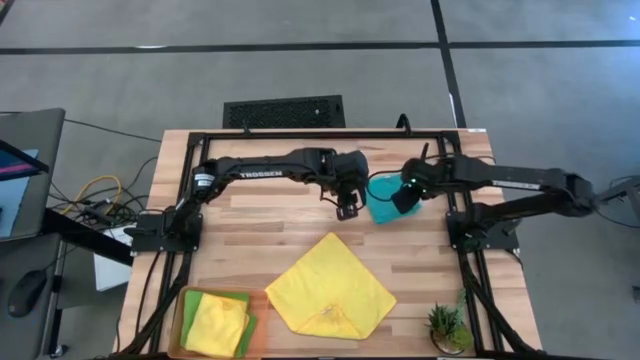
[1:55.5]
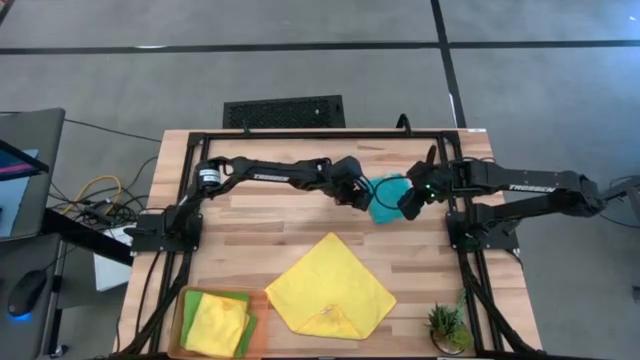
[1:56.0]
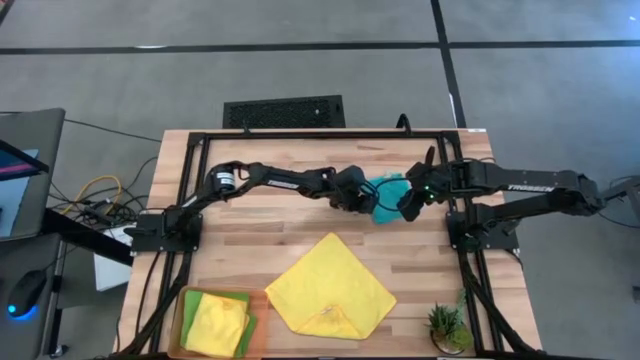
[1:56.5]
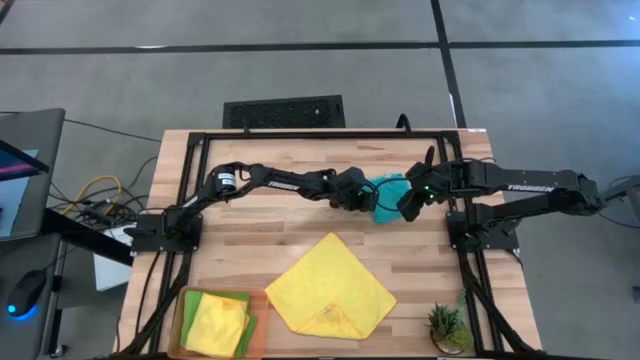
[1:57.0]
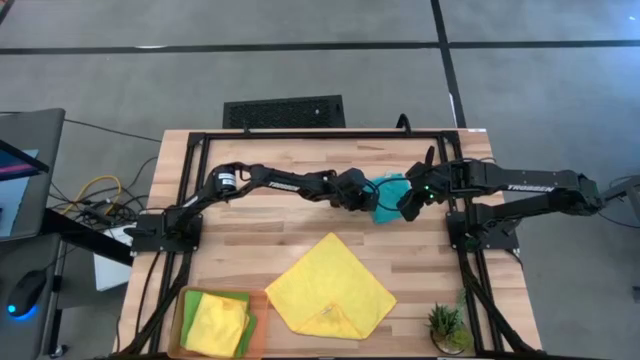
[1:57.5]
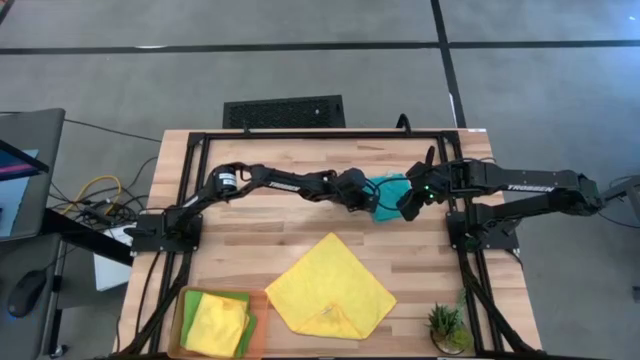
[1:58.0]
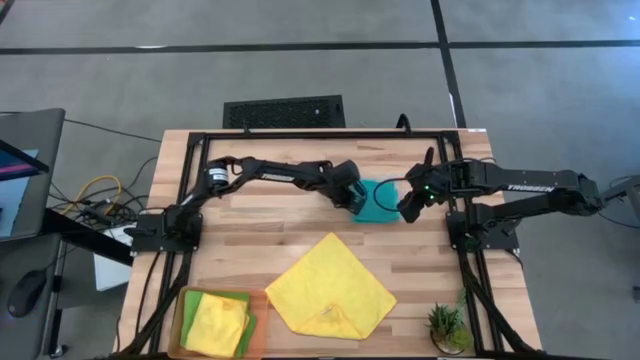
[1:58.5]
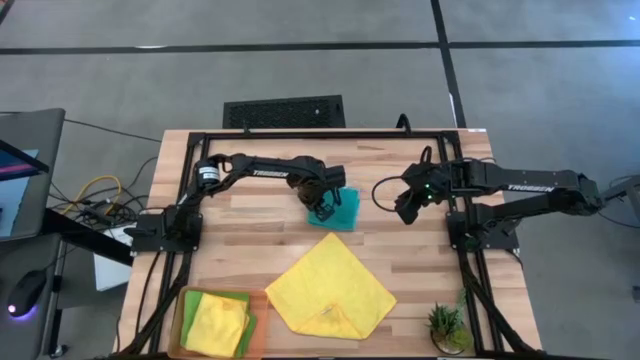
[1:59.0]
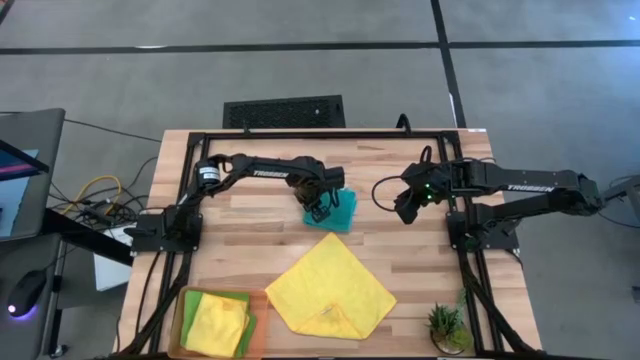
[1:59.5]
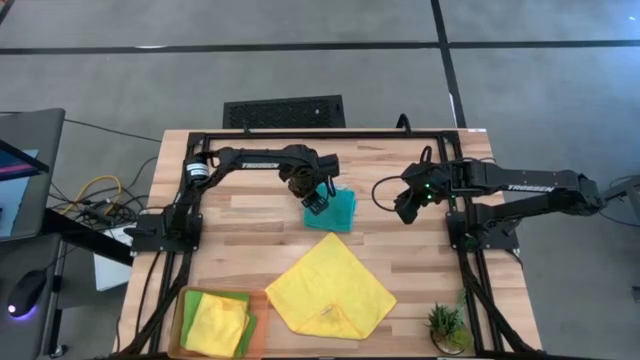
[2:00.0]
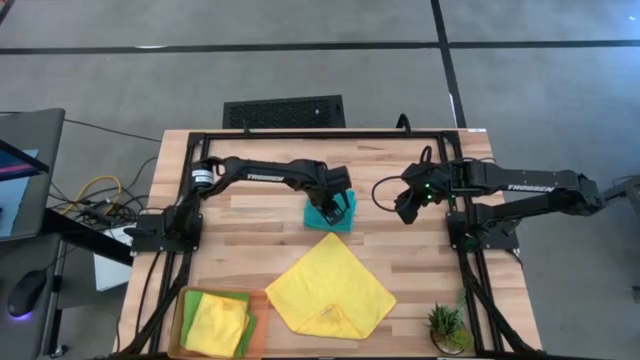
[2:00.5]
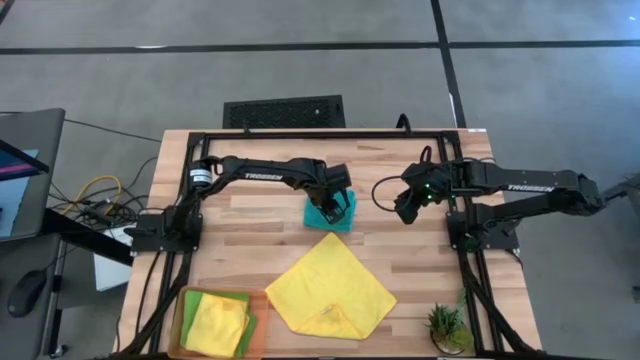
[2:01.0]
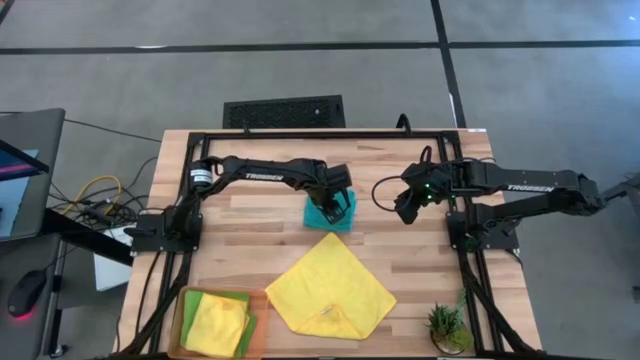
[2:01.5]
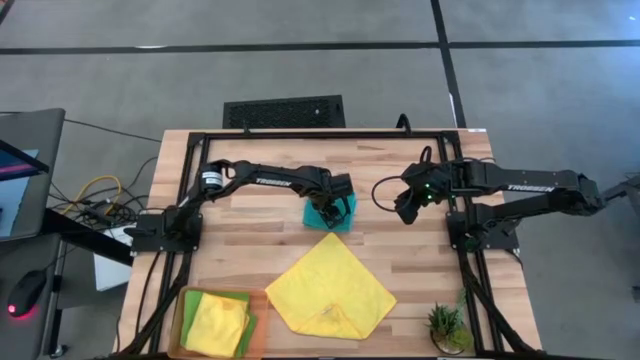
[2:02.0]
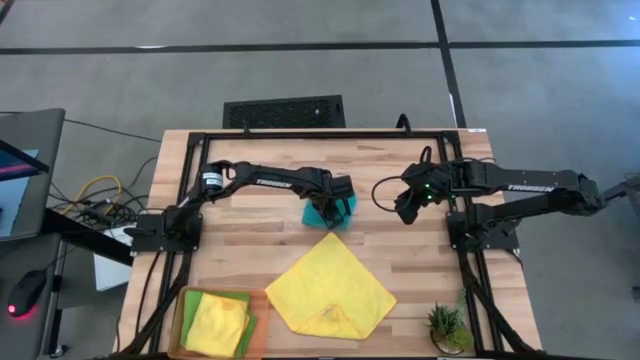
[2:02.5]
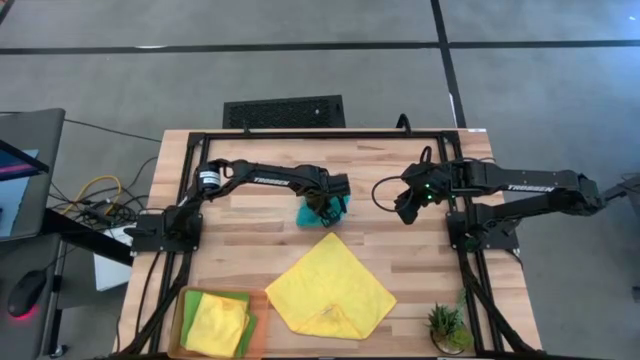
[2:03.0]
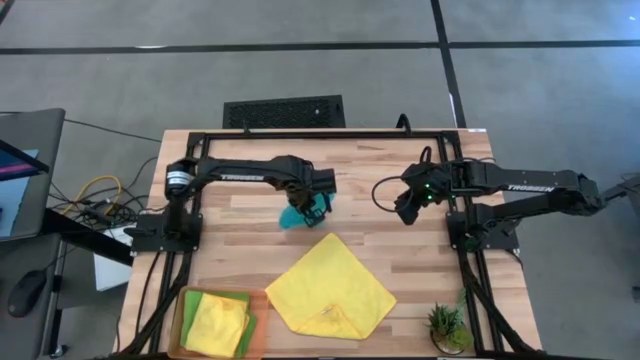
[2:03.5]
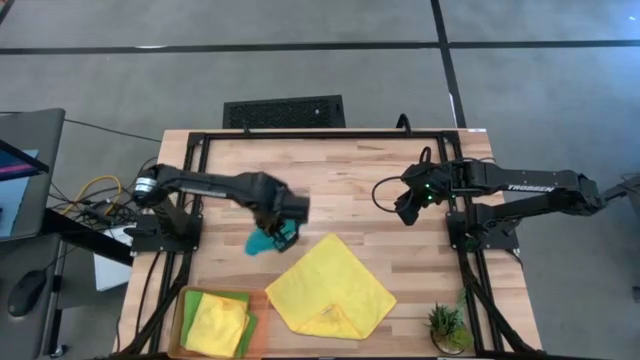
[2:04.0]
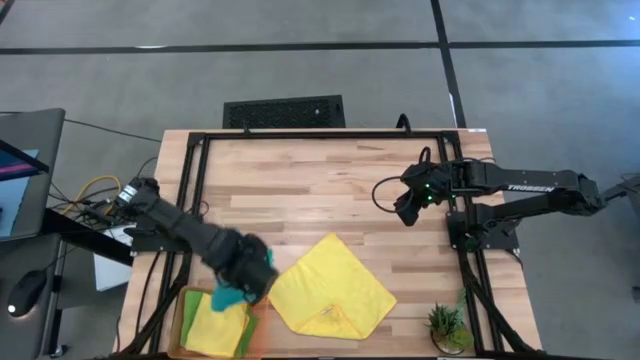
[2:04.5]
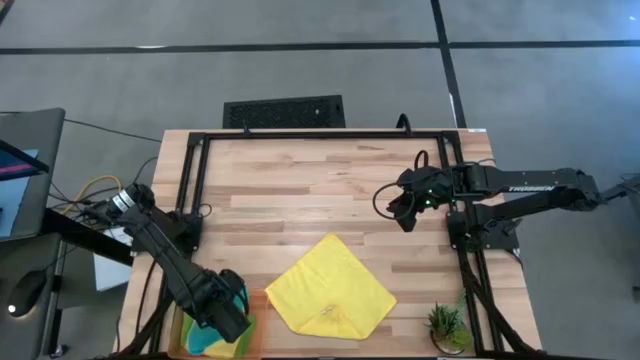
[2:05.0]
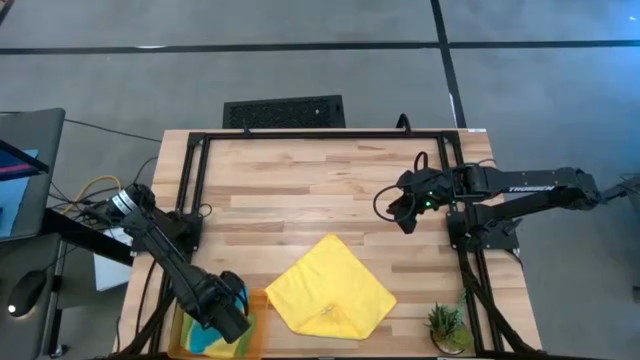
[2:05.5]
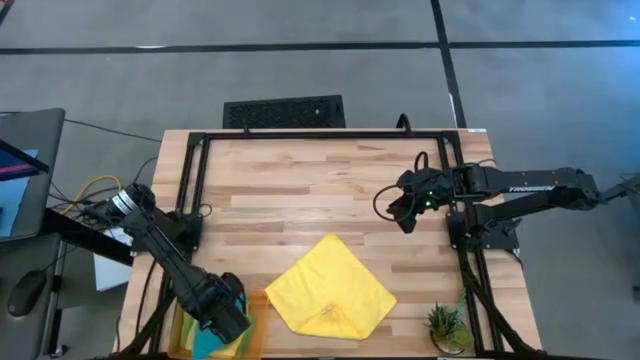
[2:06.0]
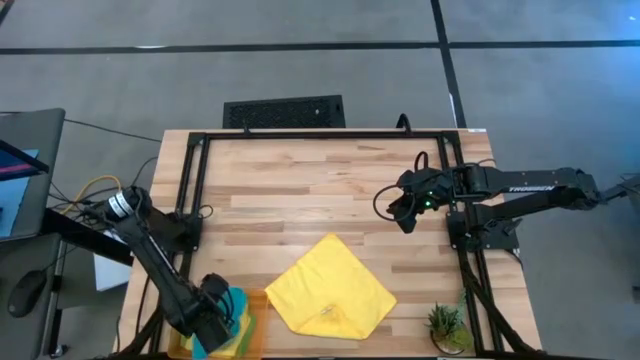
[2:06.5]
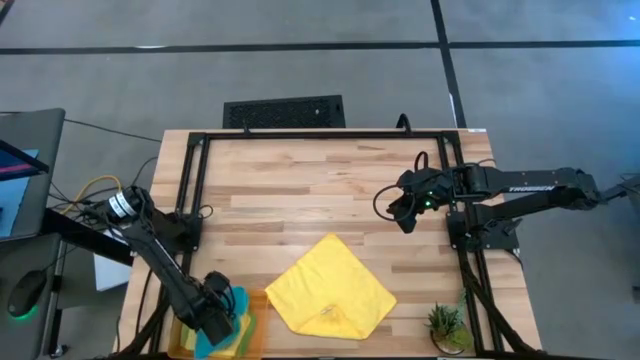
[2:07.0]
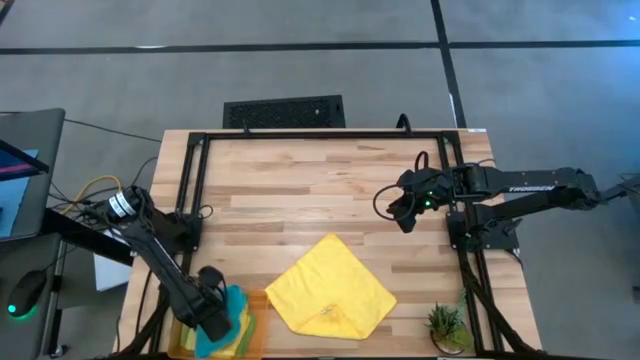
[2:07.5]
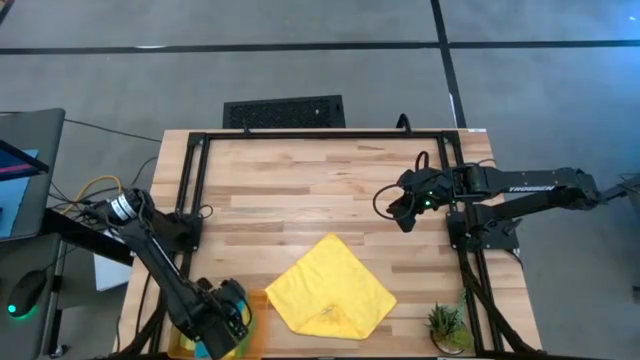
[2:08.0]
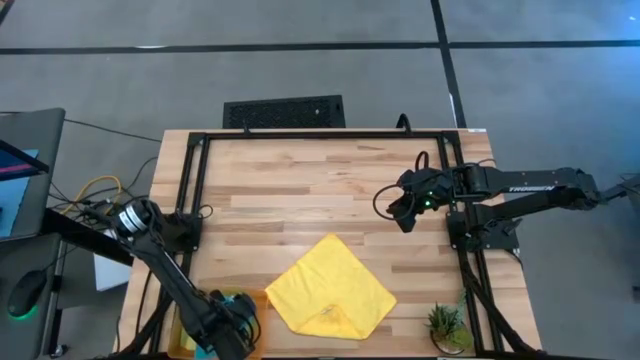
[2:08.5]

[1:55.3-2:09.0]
Task: Fold microfiber towels
Put the blue microfiber towel into the bin

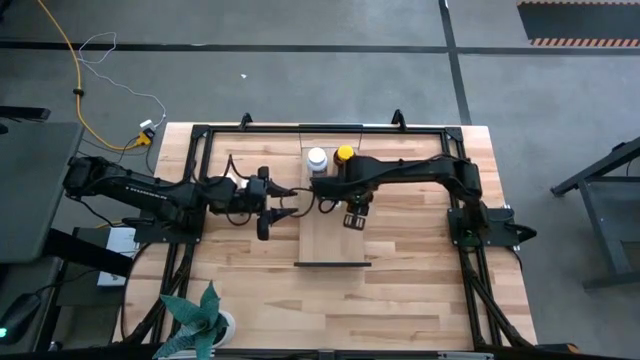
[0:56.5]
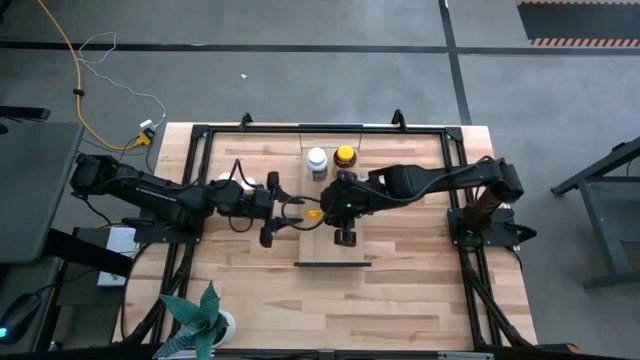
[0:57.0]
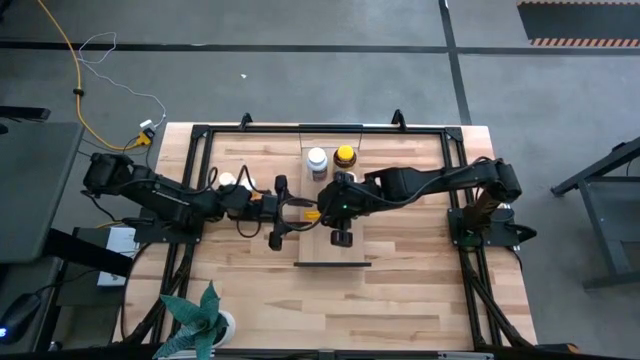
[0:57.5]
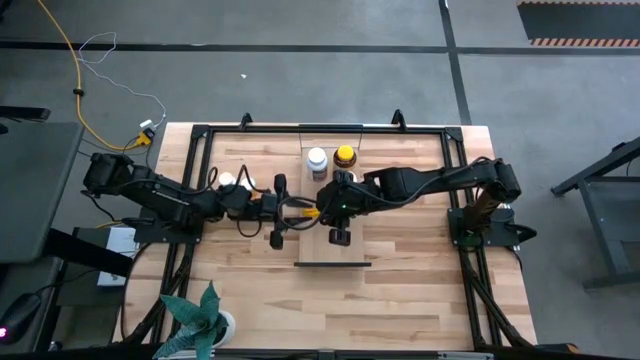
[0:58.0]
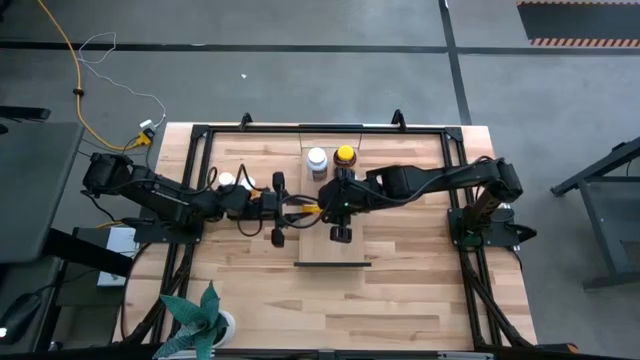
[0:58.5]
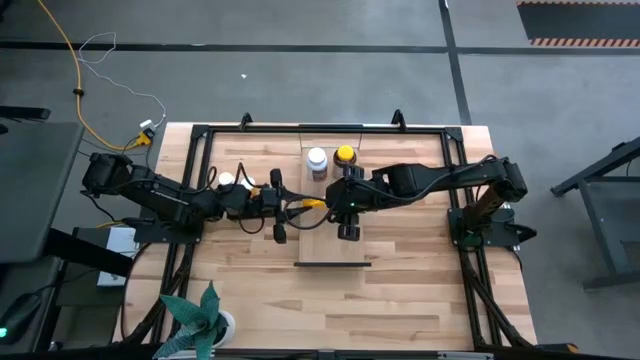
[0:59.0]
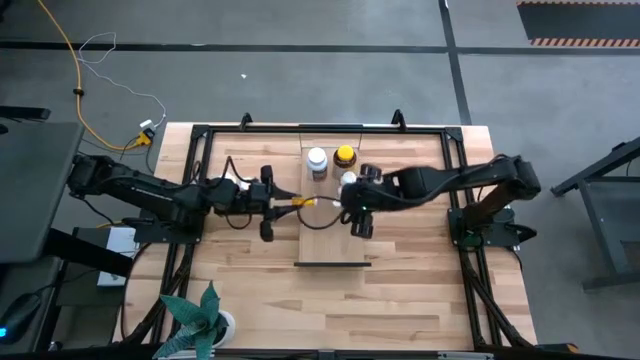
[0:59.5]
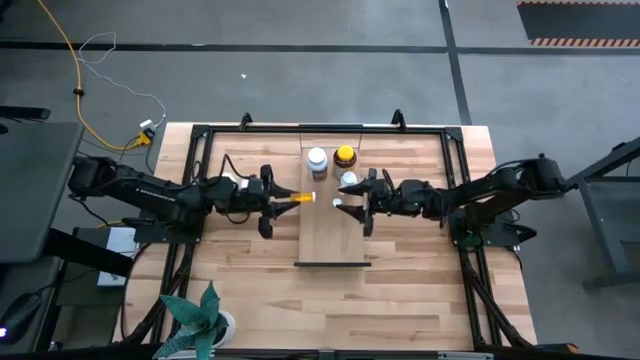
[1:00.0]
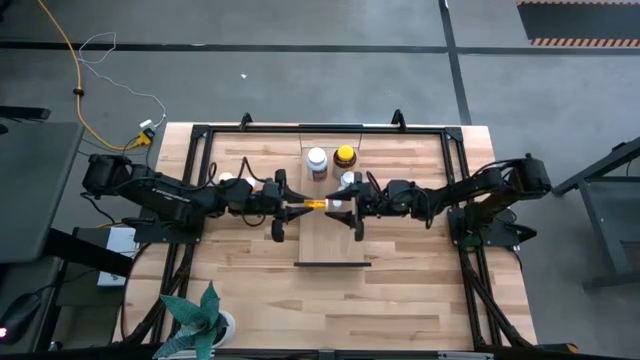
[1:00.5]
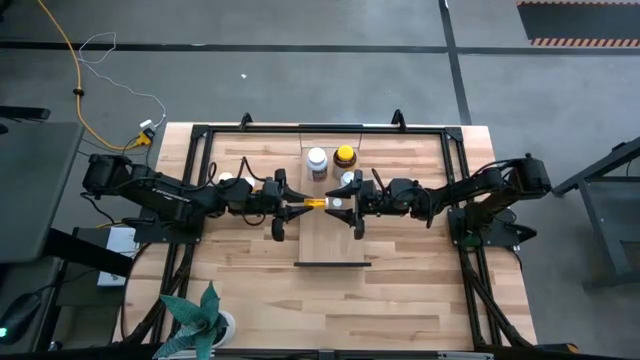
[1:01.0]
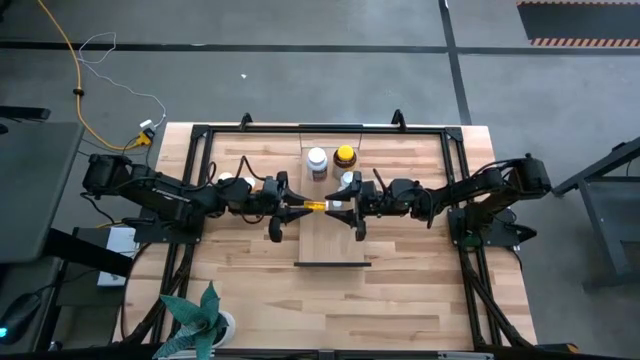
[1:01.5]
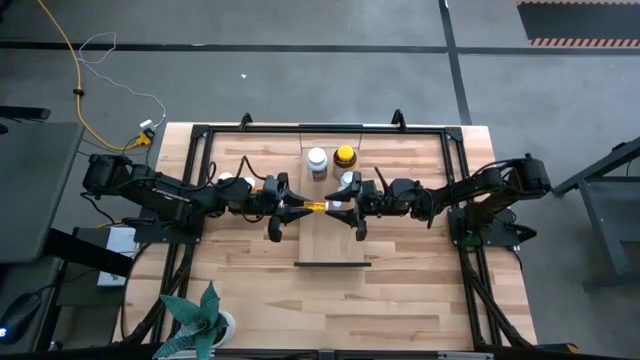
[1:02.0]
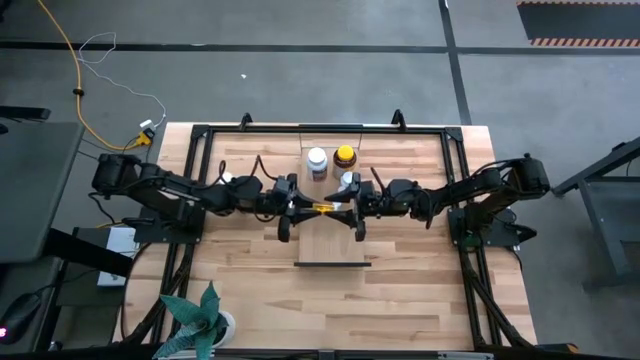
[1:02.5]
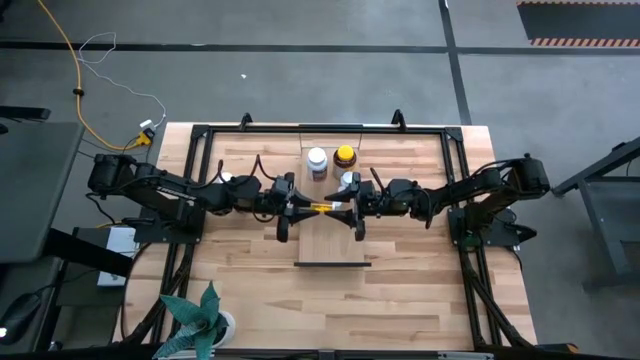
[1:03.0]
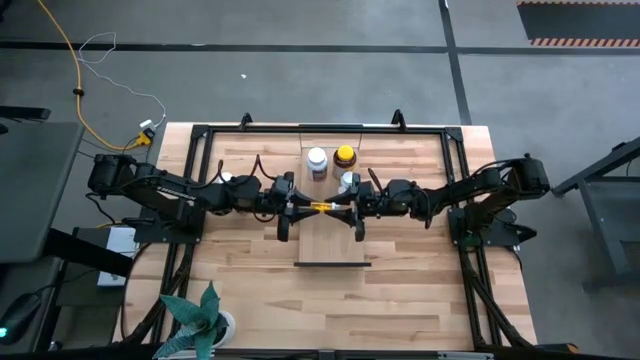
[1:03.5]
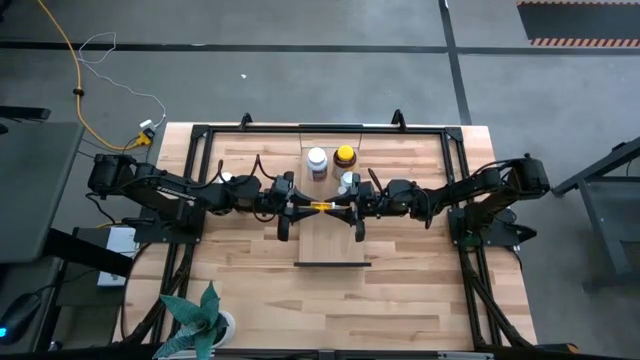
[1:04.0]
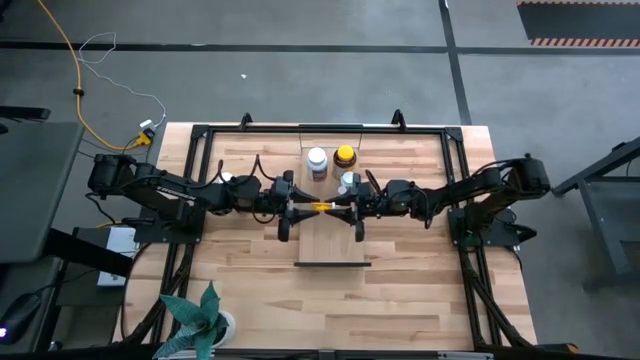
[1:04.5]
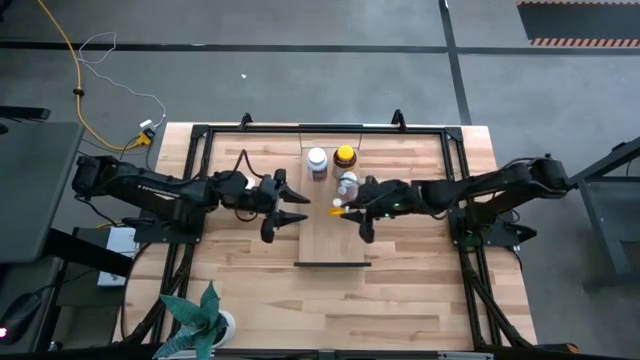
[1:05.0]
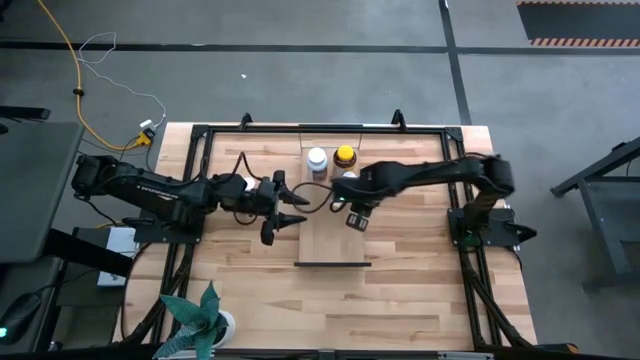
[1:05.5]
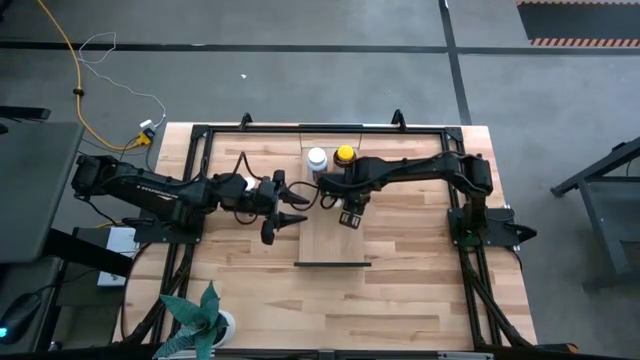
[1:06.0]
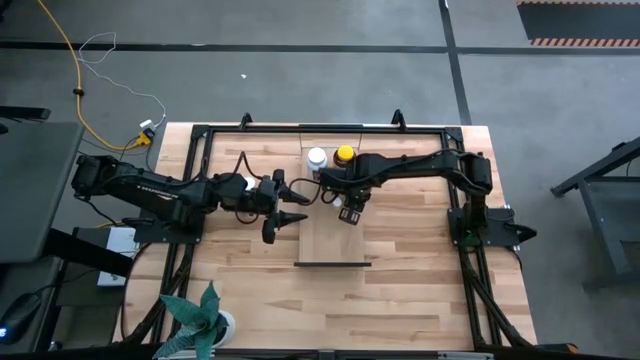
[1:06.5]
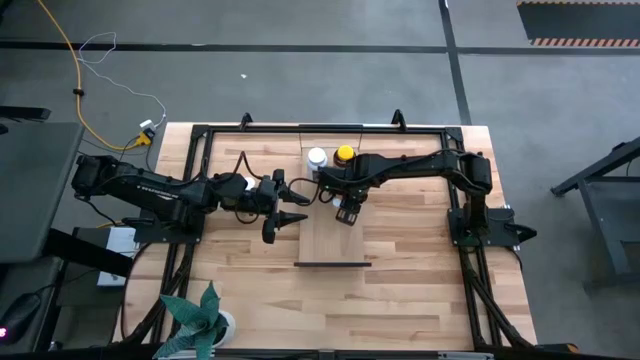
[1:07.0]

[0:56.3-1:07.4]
Task: Pick and place medicine bottles onto shelf by color
Put the small orange pill bottle on the shelf
